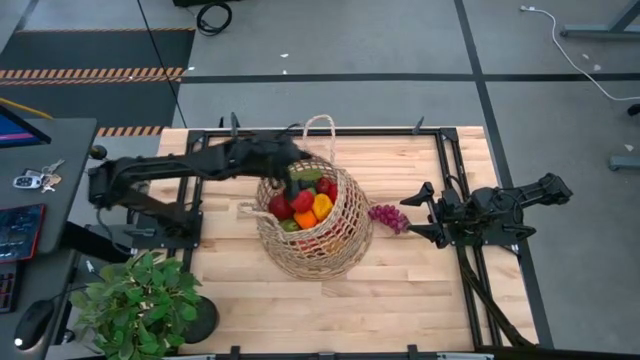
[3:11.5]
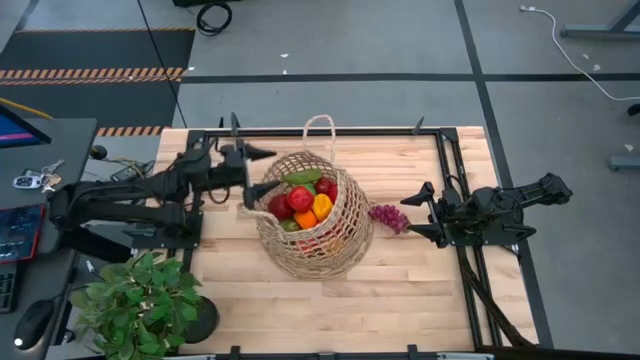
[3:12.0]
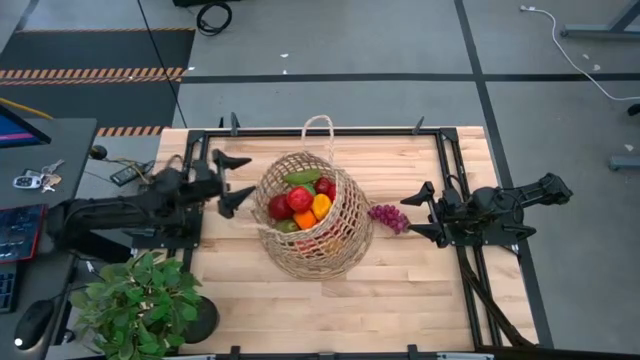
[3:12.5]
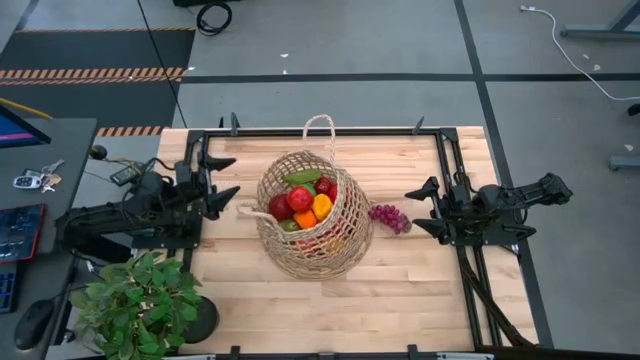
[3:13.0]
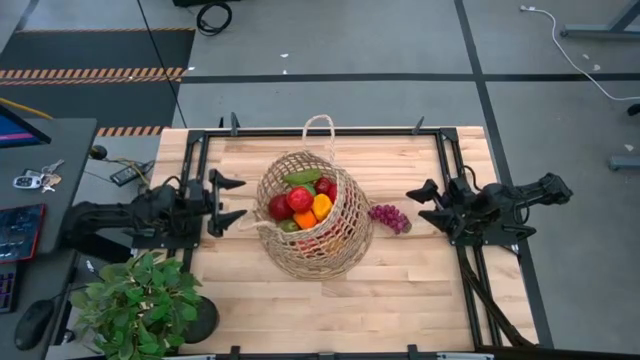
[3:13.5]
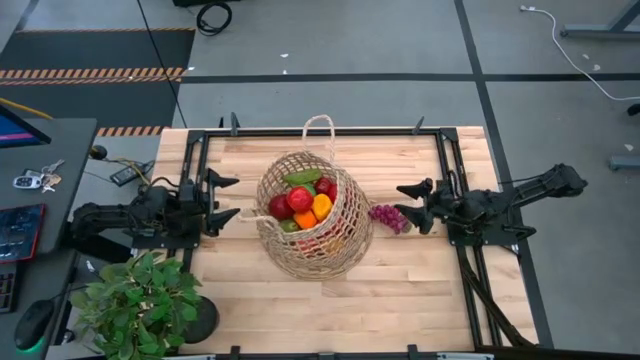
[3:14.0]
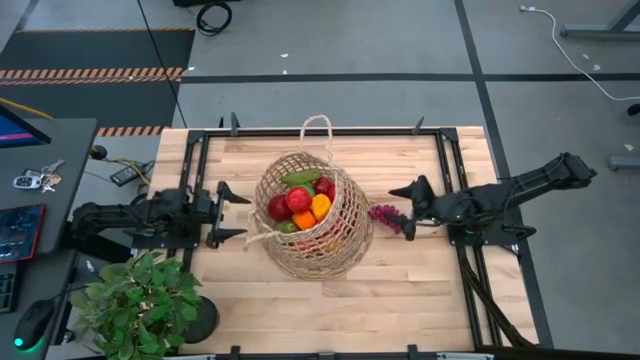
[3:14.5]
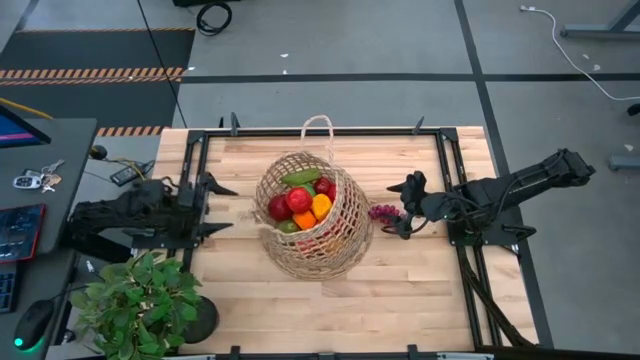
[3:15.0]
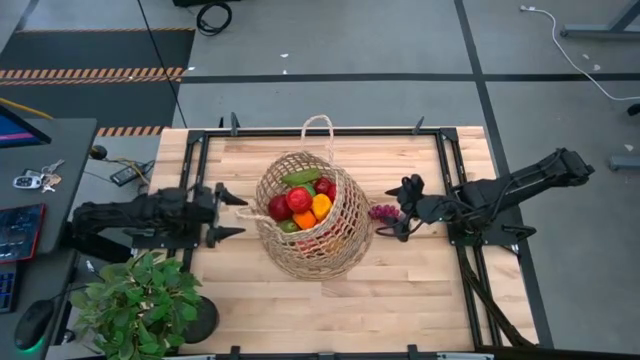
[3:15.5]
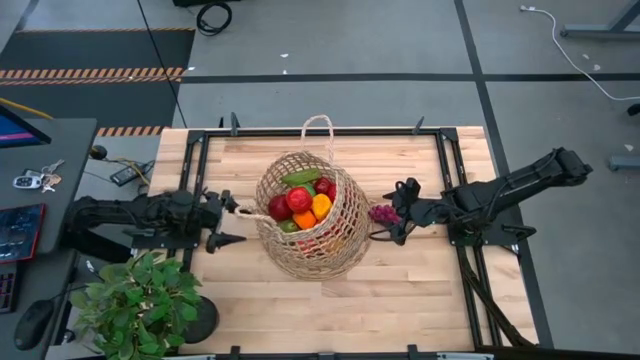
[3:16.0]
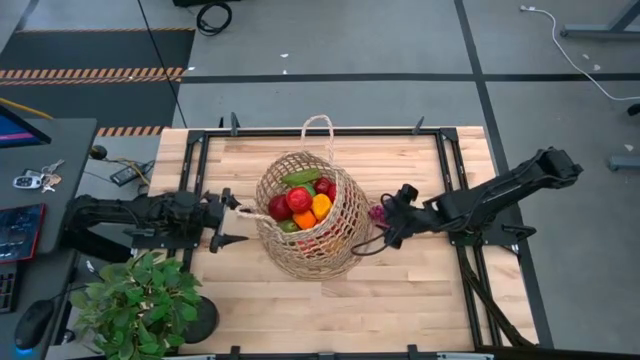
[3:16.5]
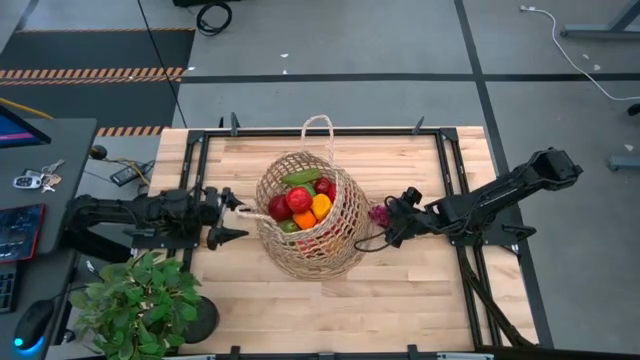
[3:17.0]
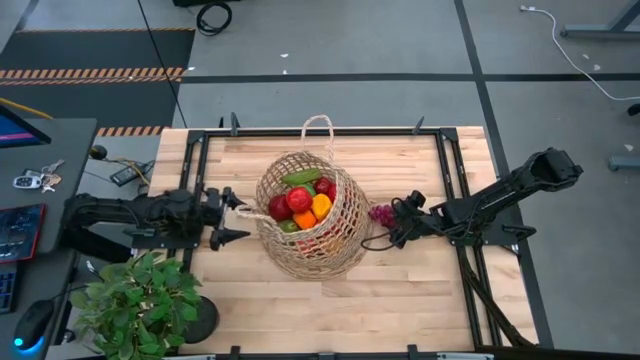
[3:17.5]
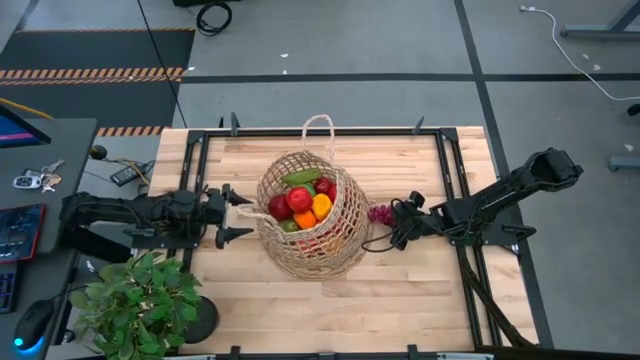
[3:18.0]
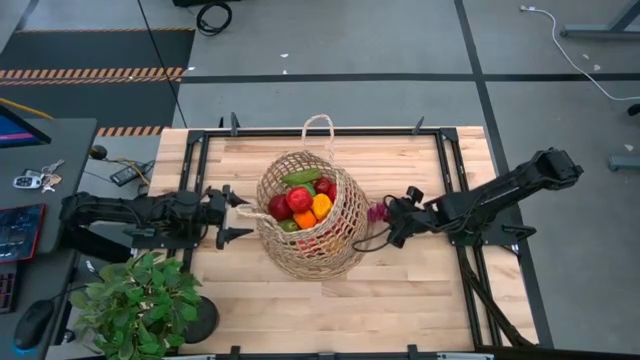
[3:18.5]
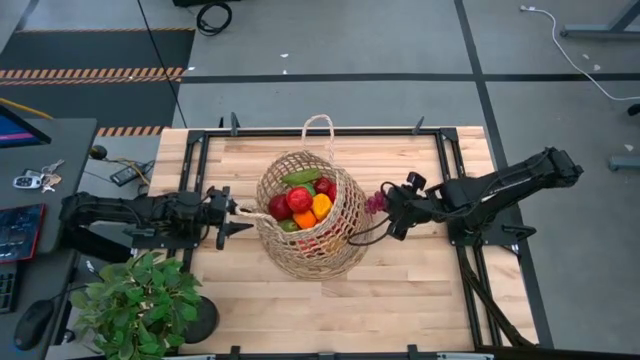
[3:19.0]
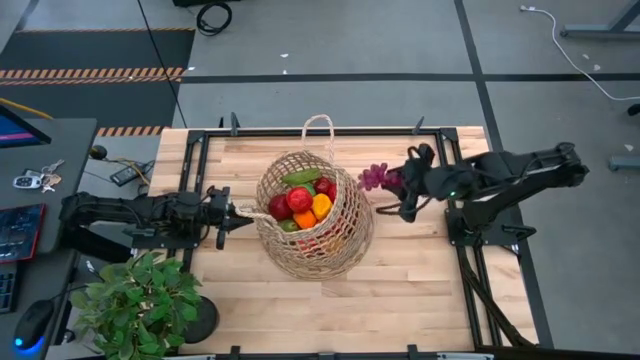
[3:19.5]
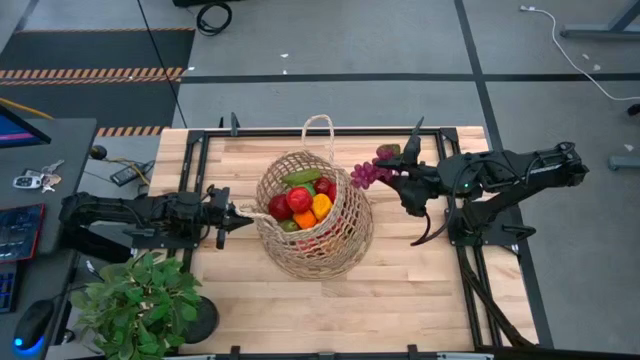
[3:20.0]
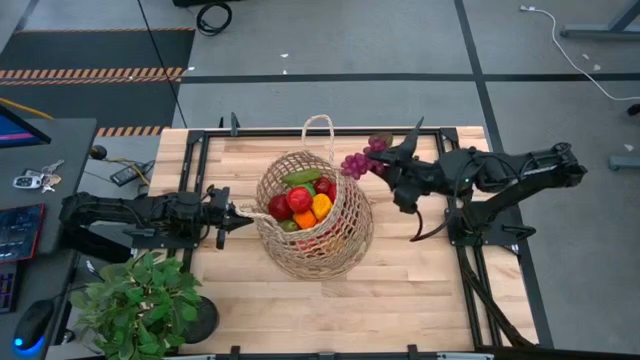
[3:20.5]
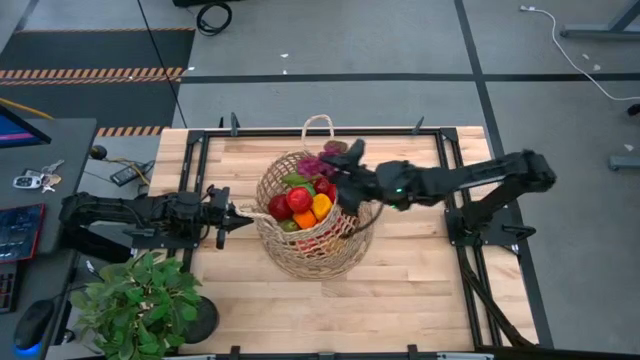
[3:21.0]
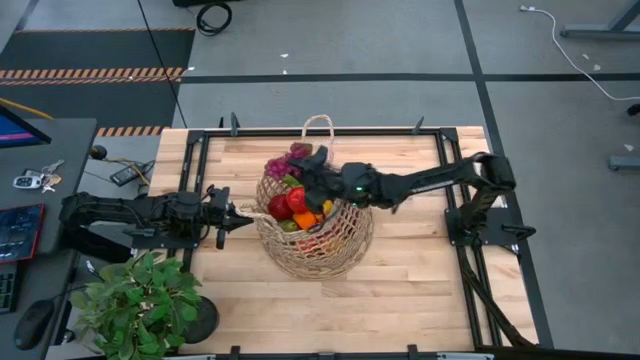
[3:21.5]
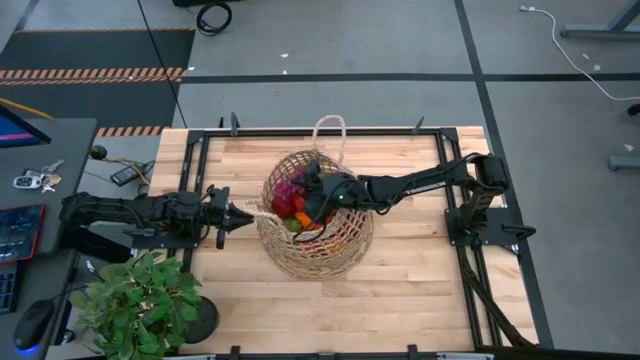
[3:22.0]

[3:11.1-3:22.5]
Task: Build produce basket
Put the purple grapes into the basket

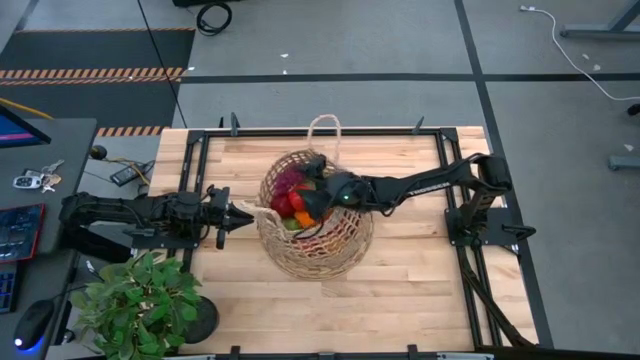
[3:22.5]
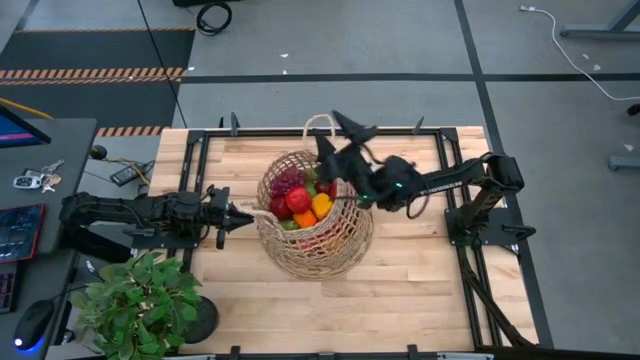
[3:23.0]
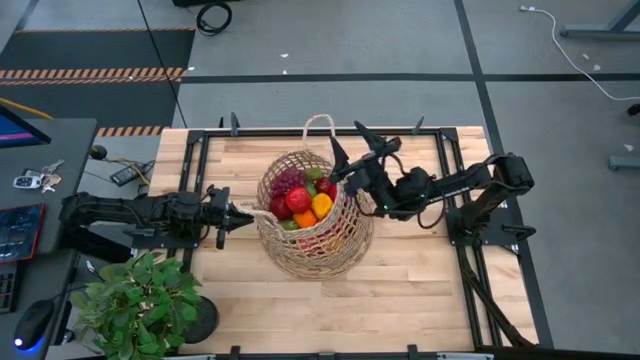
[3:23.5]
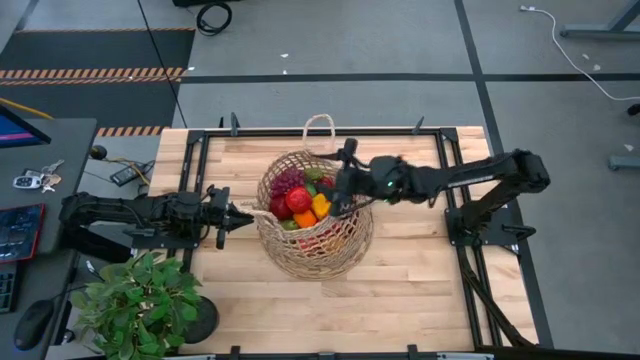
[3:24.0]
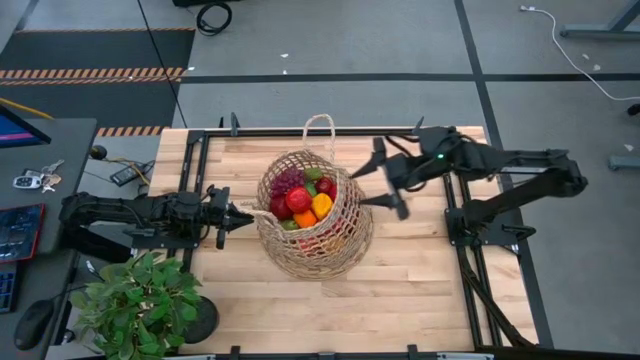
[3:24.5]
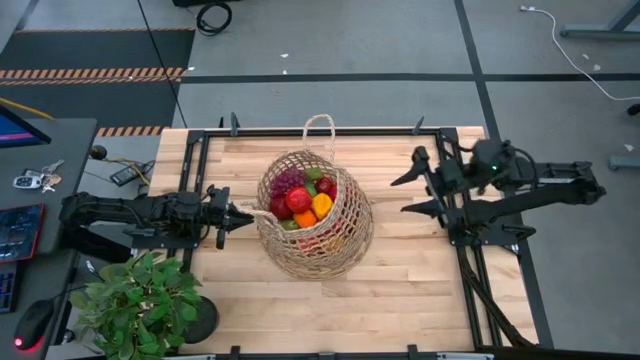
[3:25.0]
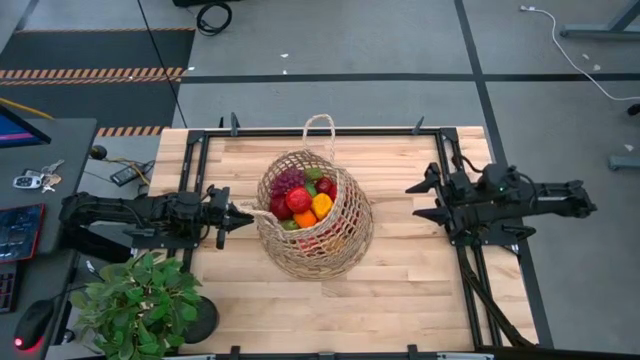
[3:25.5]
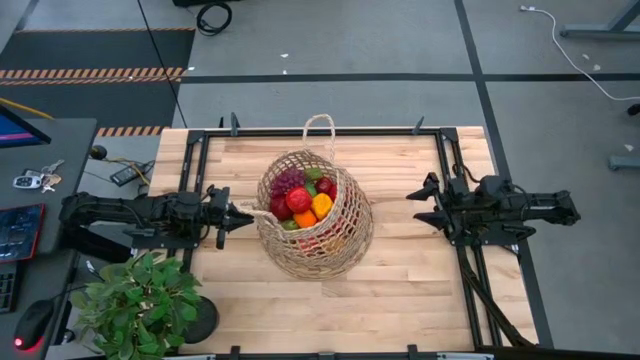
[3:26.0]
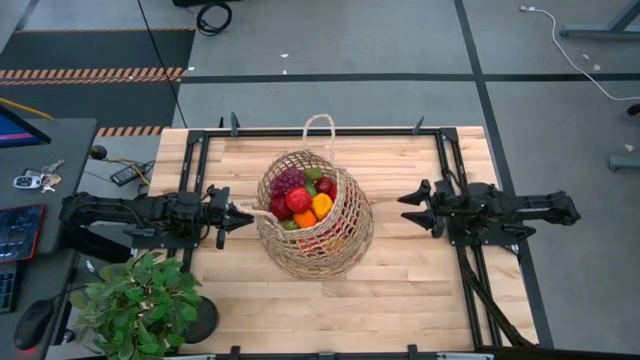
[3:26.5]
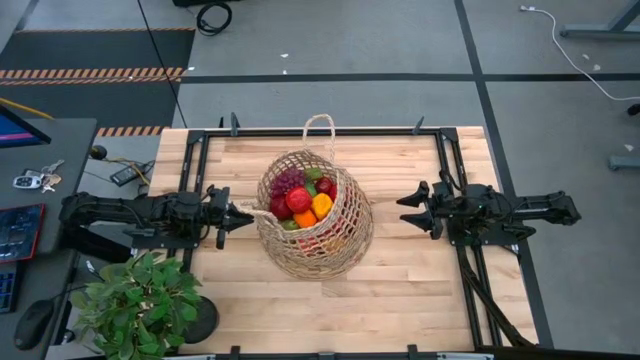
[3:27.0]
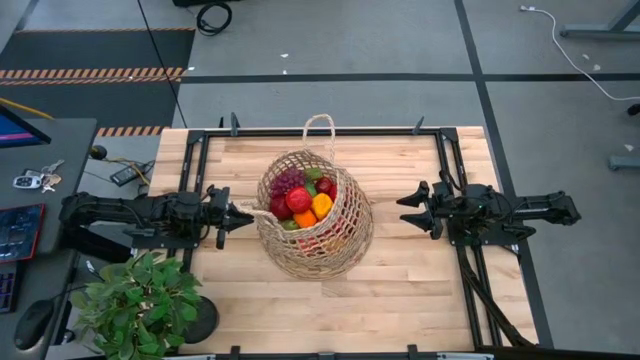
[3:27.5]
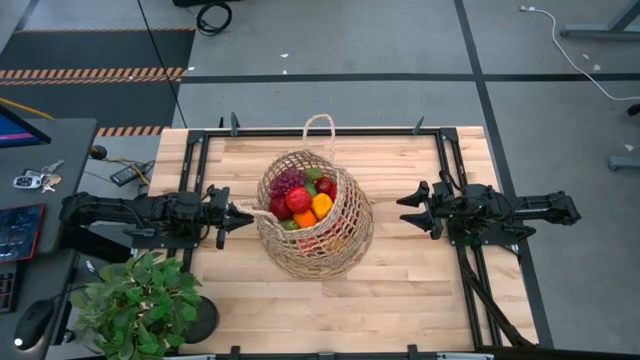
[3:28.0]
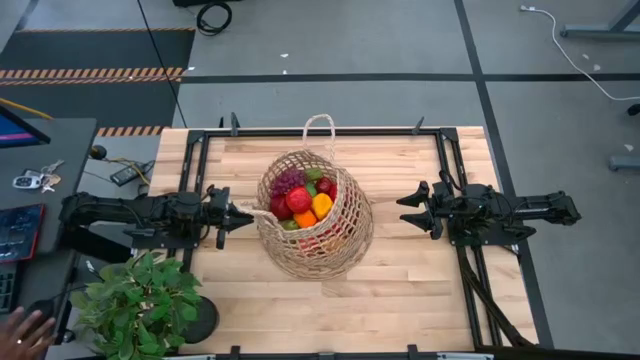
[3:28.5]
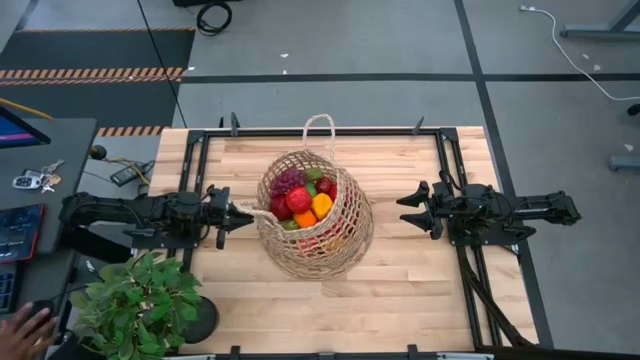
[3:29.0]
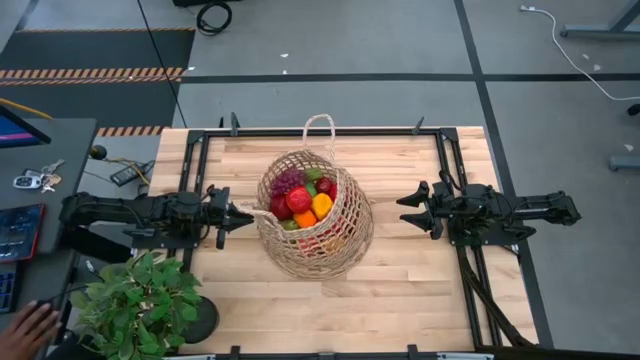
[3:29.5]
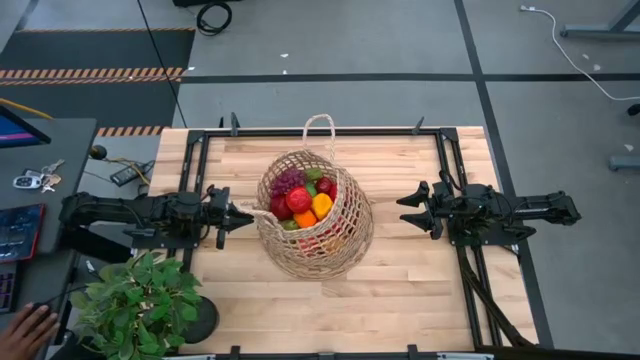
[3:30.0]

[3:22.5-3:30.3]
Return to Home Position

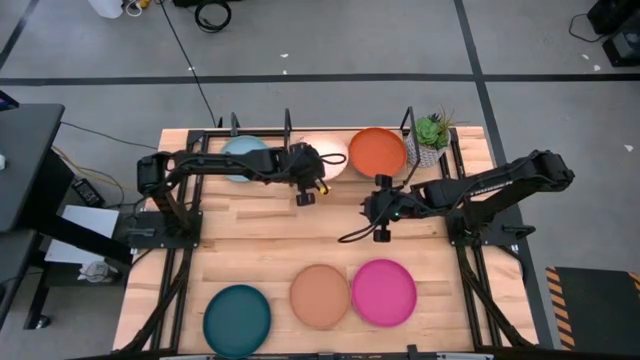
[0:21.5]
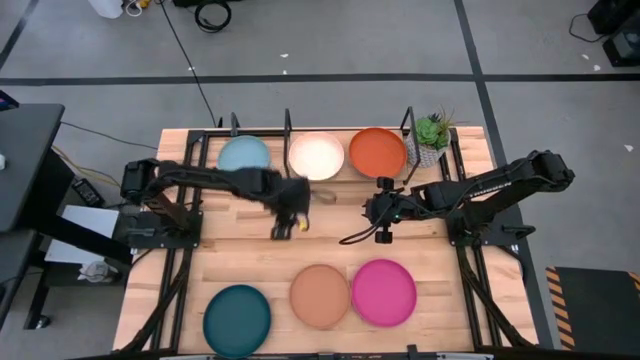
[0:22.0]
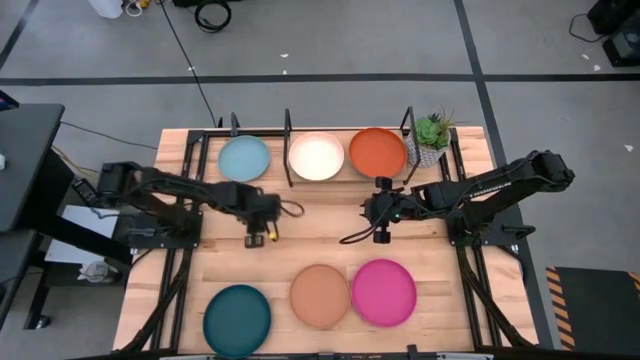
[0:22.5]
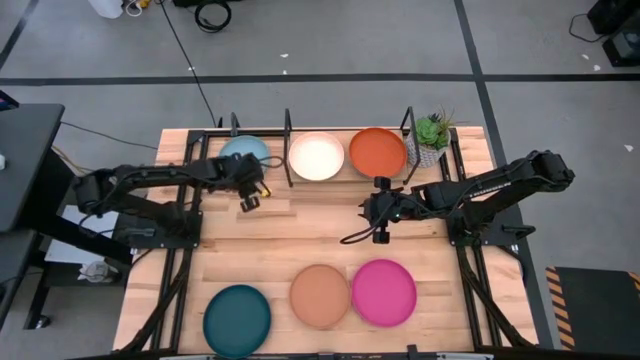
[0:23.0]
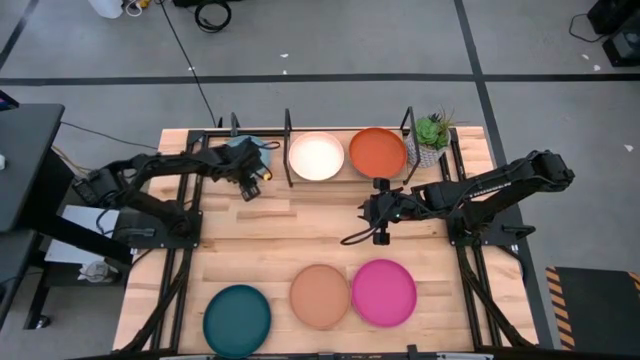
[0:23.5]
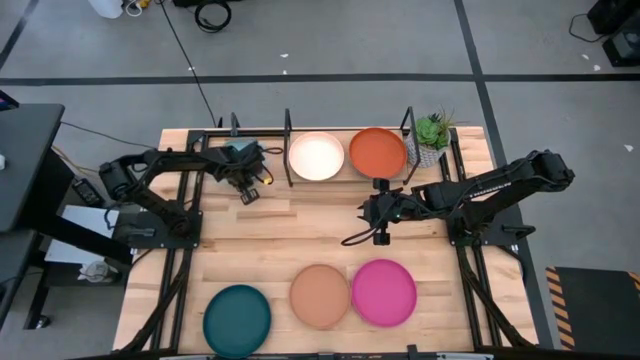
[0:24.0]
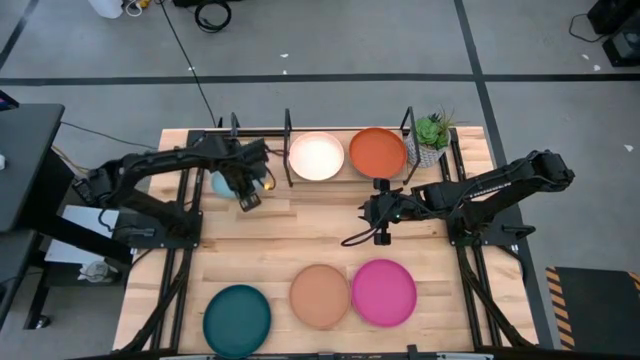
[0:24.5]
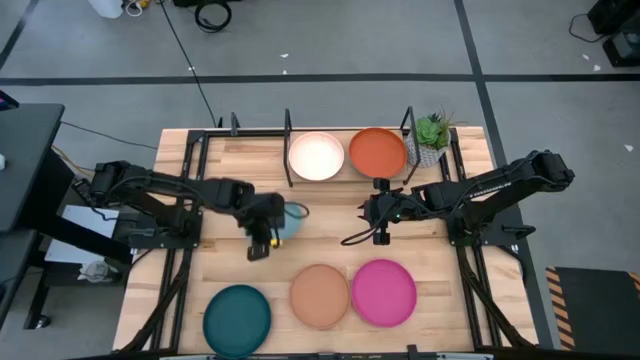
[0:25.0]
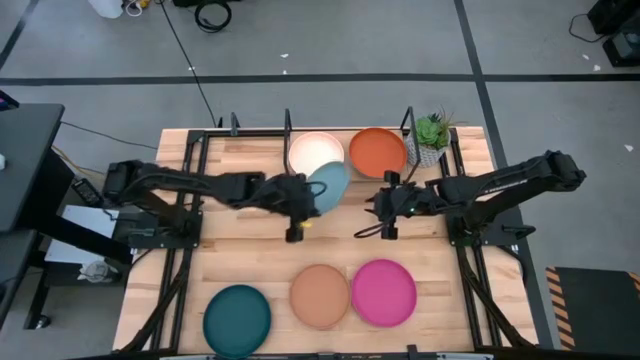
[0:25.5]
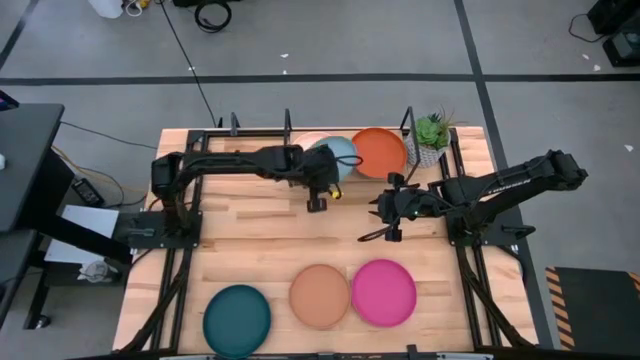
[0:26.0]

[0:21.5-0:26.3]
Task: Place and stack plates onto a shelf
Stack the light blue plate on top of the light orange plate on the shelf
